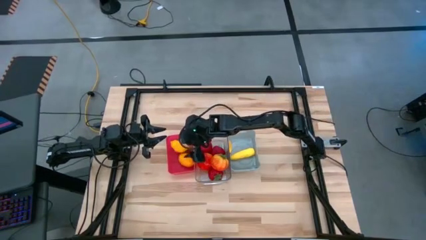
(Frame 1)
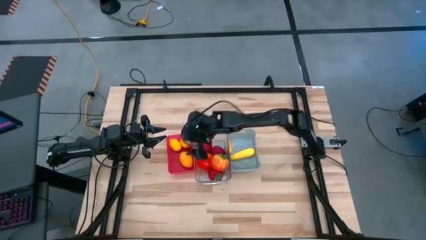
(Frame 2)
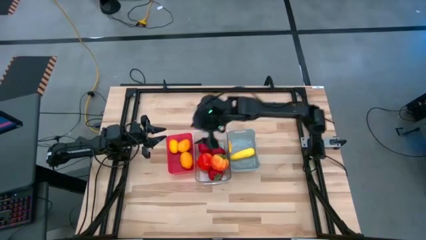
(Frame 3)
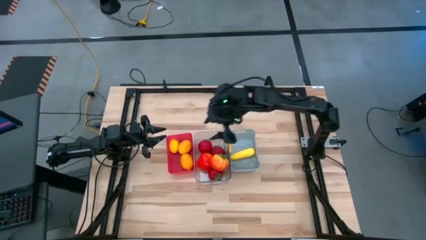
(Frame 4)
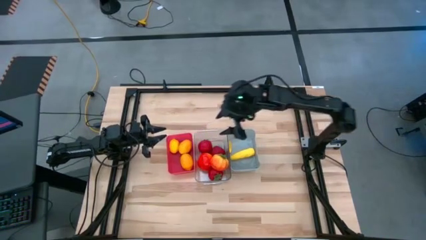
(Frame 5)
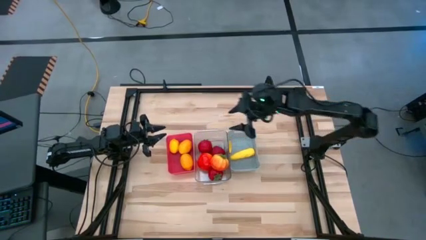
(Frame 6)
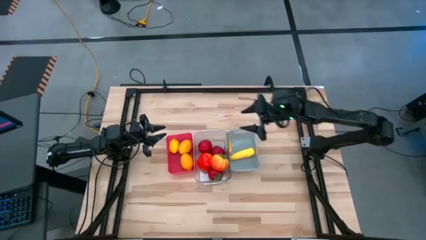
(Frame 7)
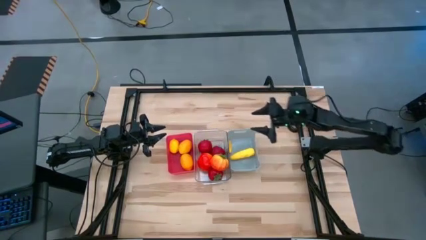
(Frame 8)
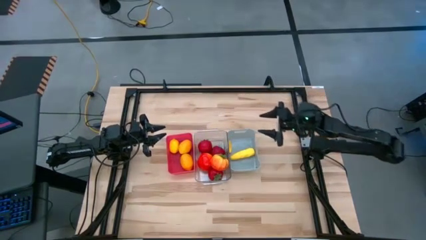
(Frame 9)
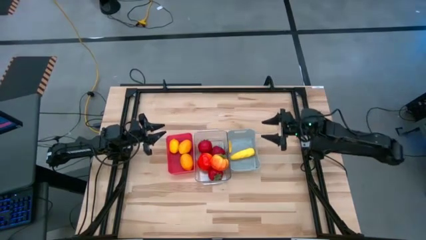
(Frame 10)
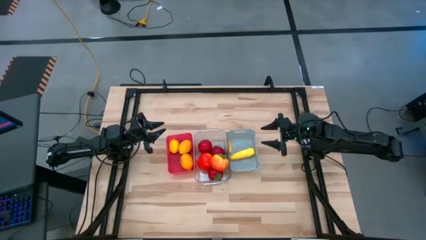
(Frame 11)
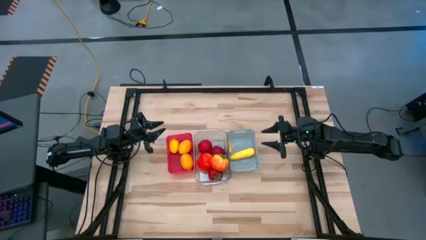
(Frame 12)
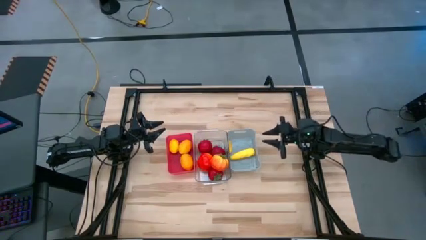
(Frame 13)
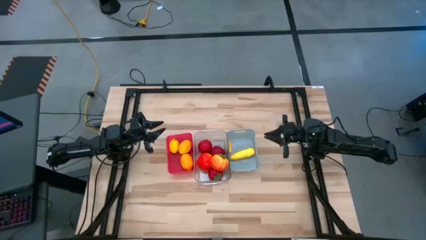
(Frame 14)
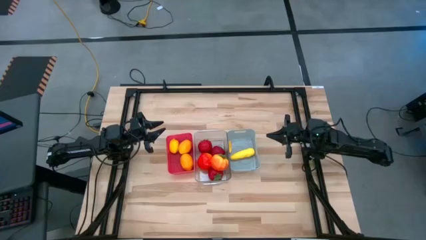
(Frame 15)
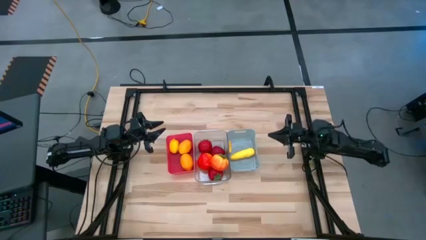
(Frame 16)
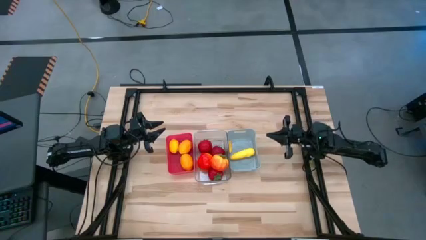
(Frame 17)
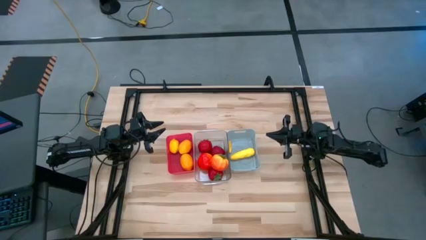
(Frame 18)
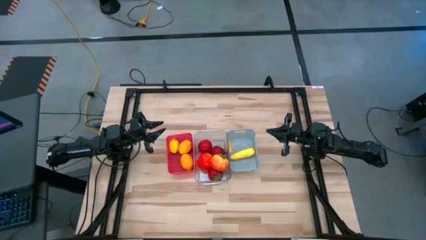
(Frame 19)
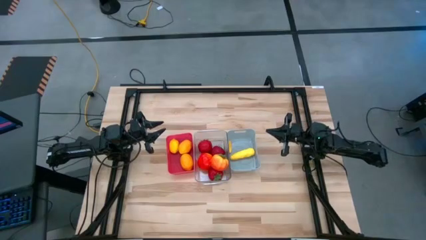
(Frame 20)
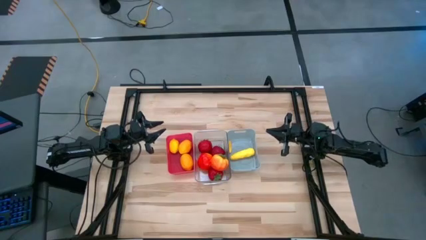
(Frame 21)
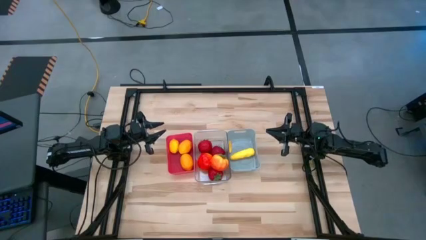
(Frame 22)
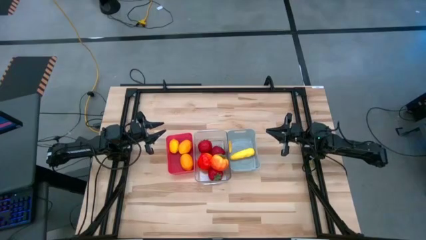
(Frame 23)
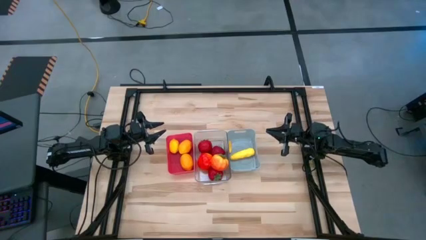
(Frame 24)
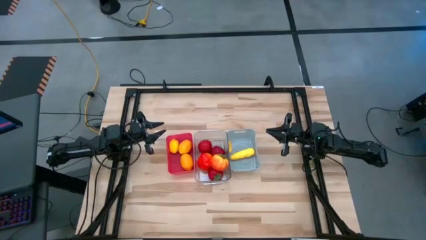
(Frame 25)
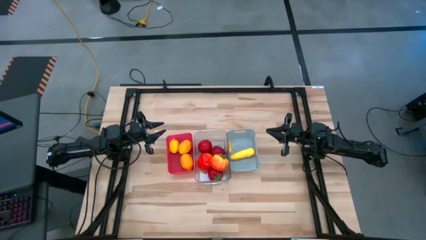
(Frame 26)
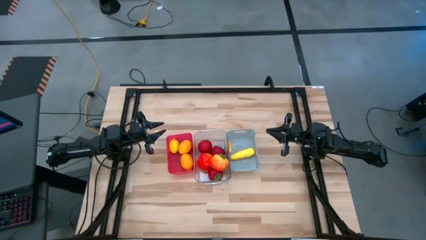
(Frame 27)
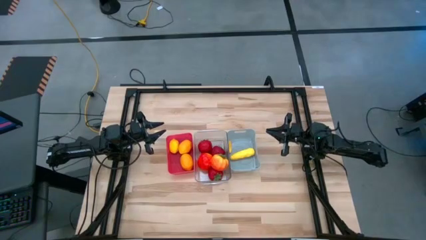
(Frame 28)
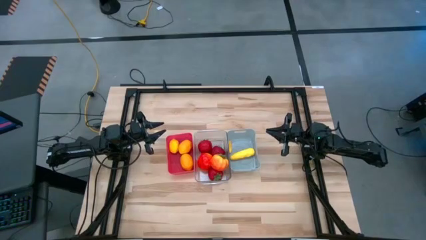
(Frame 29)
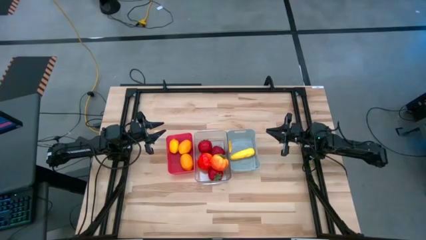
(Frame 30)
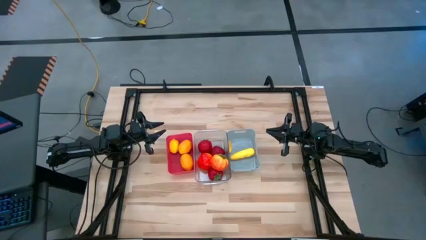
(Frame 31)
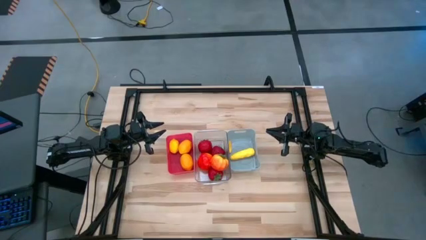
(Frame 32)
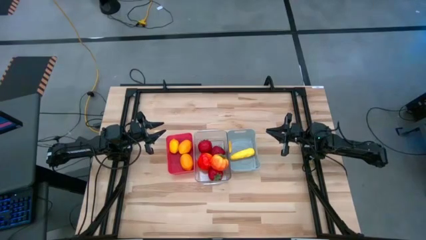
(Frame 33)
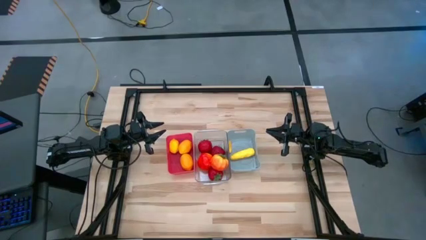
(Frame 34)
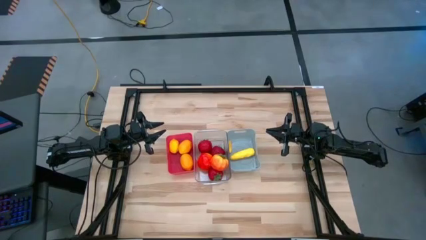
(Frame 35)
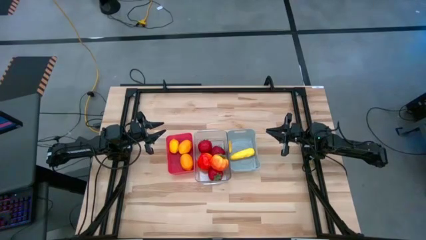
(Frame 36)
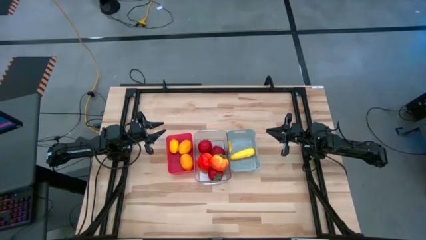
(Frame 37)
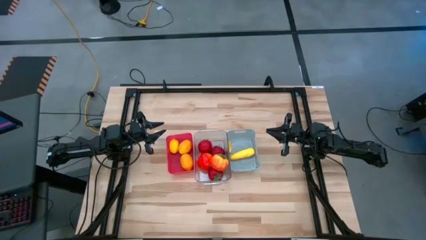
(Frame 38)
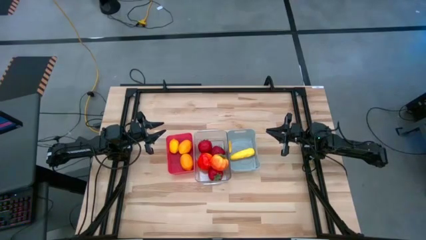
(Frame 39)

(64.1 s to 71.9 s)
Task: Sort produce into baskets
Return to Home Position

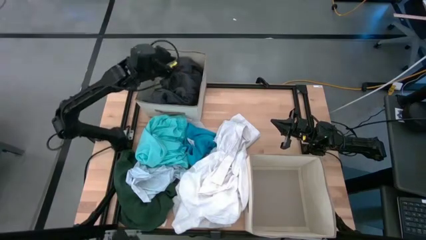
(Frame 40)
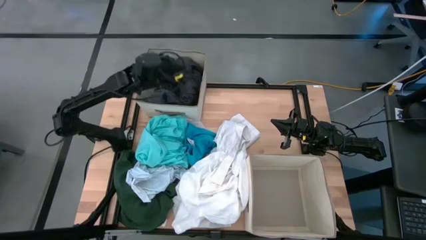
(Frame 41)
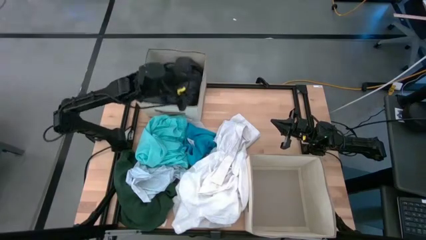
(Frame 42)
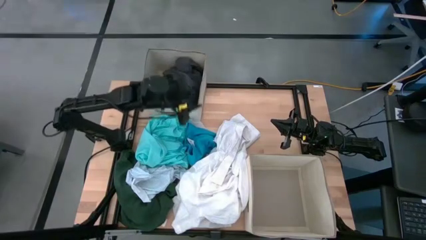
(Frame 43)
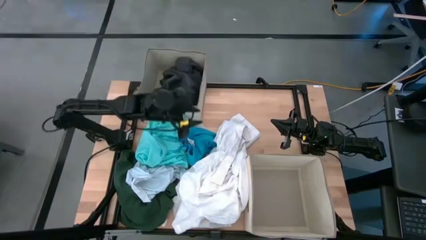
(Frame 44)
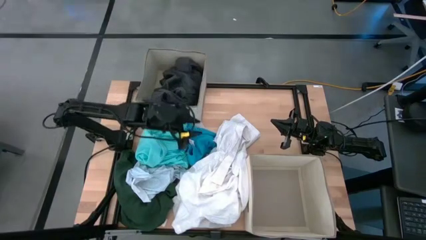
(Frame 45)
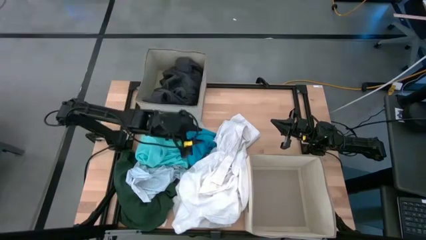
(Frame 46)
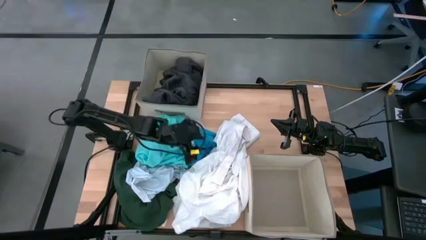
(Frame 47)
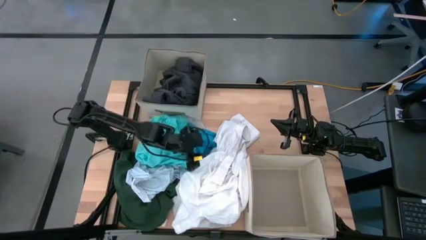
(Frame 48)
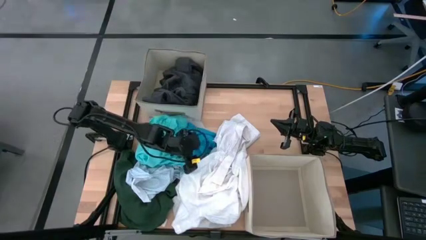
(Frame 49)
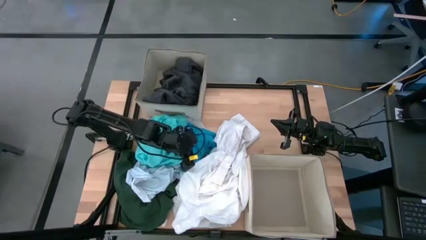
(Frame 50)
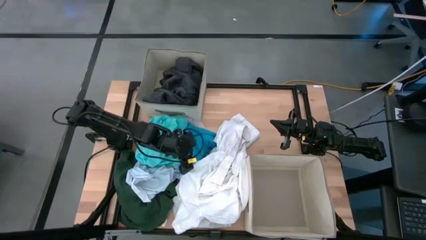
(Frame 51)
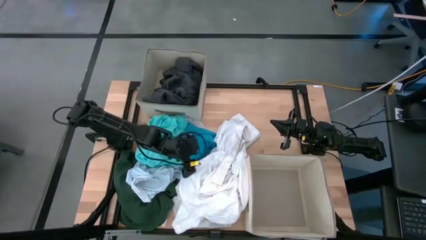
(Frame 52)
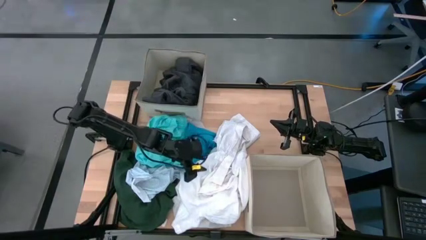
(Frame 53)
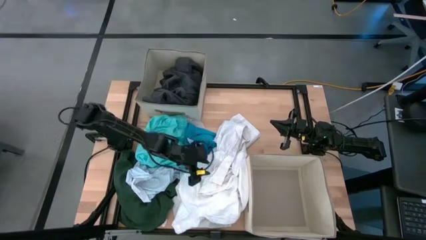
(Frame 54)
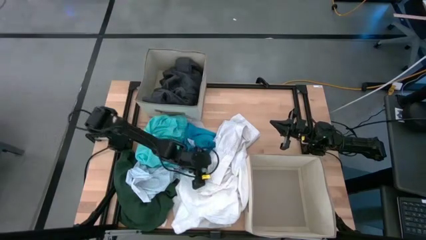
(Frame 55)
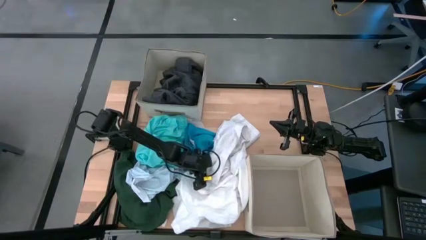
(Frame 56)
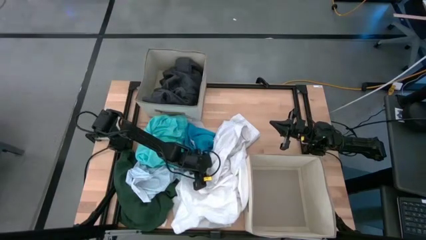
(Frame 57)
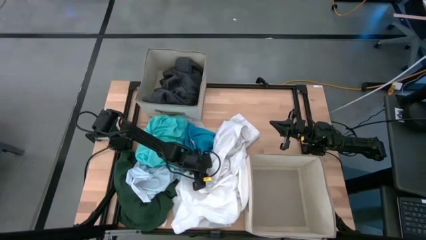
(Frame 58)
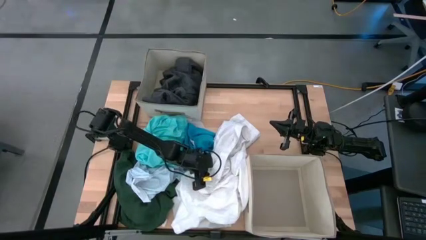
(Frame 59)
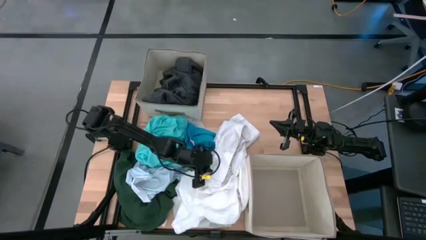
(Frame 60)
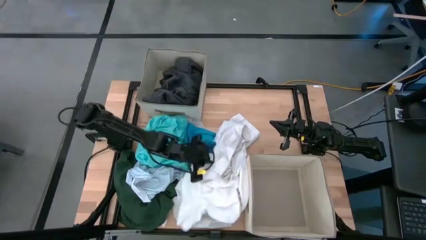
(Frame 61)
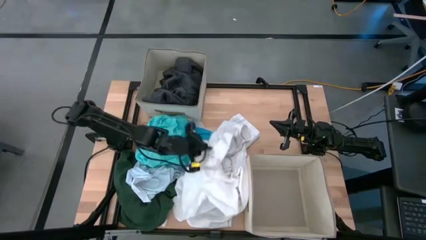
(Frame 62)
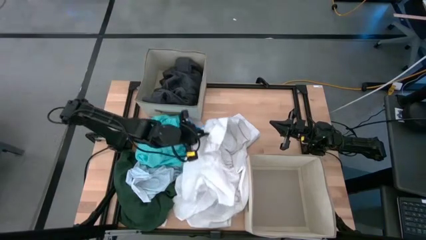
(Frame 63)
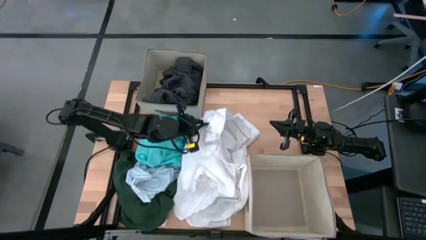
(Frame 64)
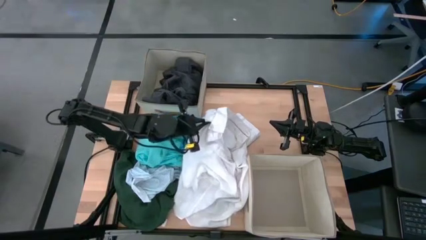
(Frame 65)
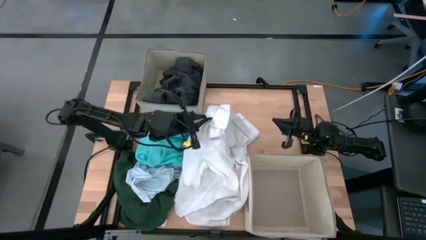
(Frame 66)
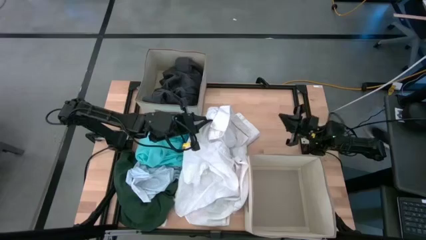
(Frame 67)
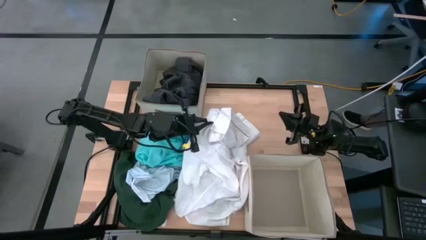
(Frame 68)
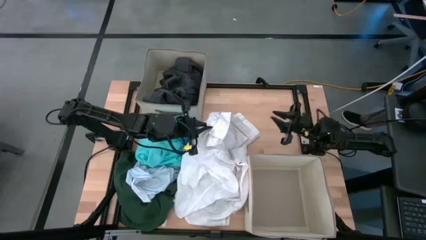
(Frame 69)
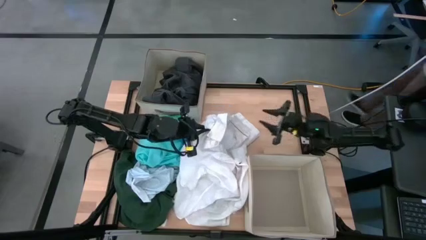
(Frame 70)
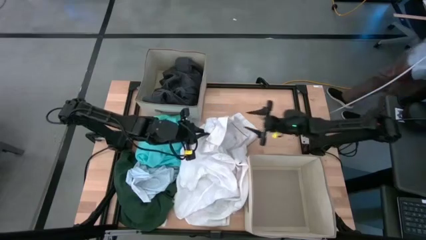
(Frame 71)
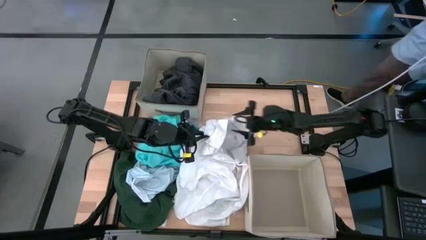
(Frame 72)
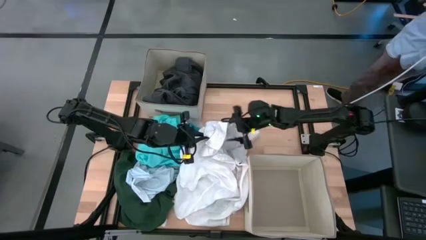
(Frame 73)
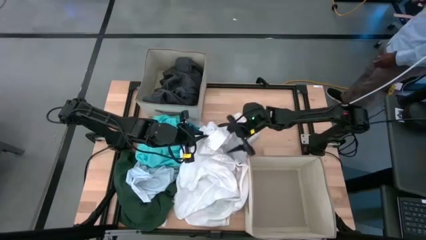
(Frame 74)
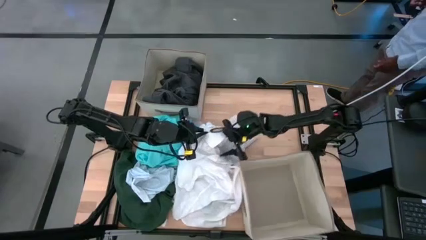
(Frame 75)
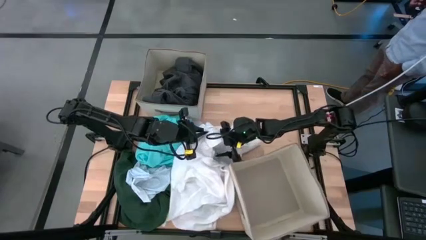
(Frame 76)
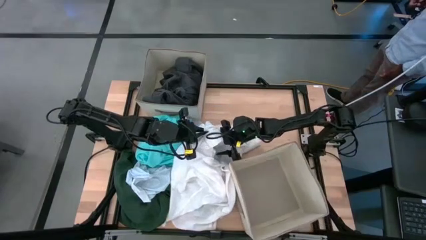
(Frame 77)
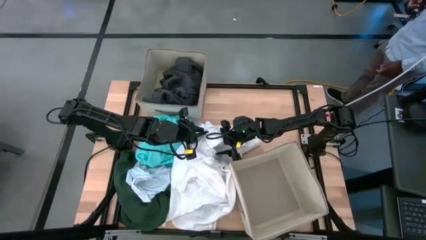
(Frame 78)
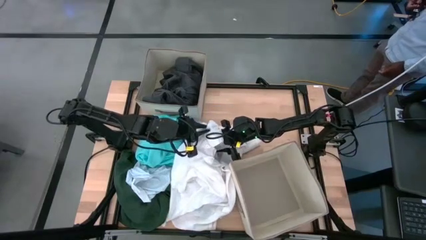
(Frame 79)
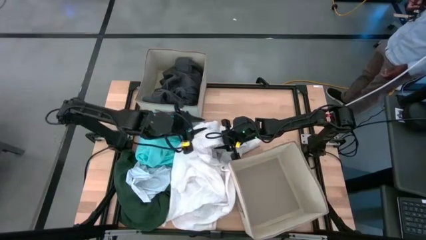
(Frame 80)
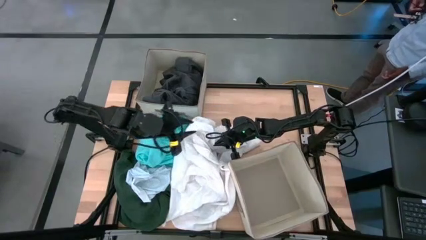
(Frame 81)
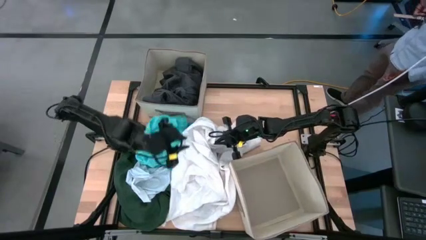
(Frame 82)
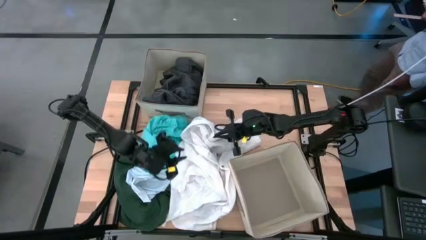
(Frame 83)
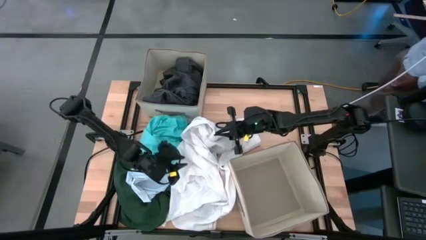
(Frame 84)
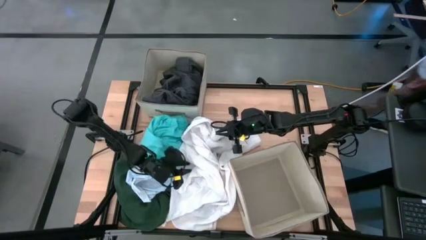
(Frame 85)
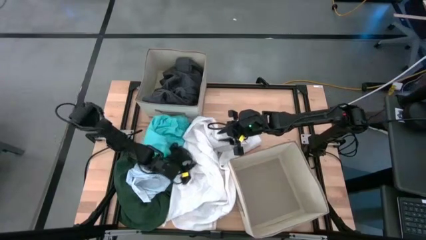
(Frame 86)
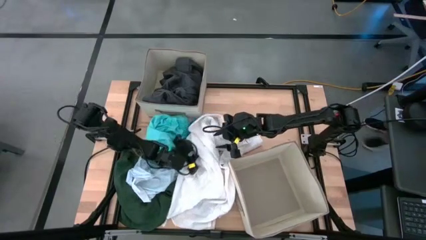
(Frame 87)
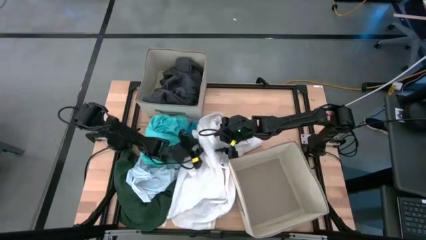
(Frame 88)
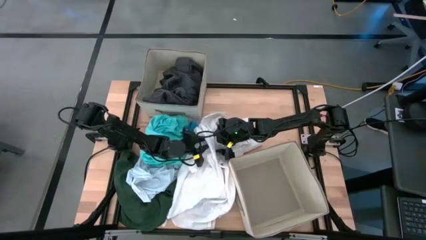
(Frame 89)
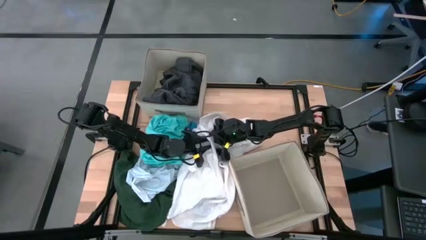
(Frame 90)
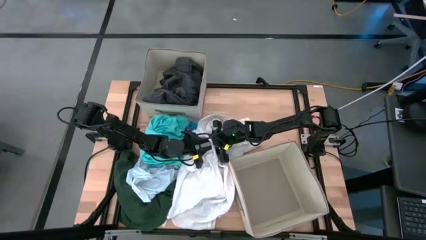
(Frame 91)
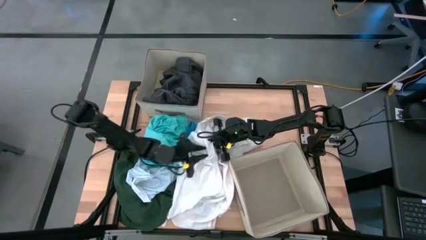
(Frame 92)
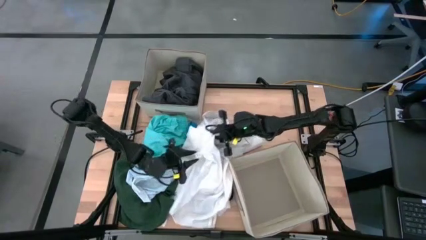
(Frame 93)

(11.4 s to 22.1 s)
Task: Sort clothes
Put the white polo into the bottom white laundry bin
